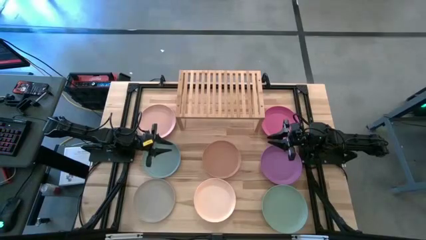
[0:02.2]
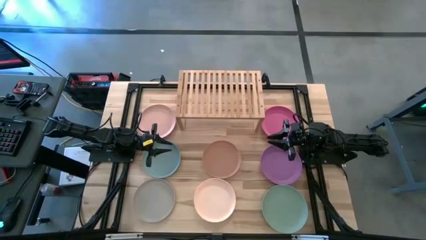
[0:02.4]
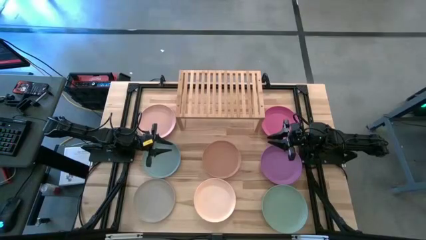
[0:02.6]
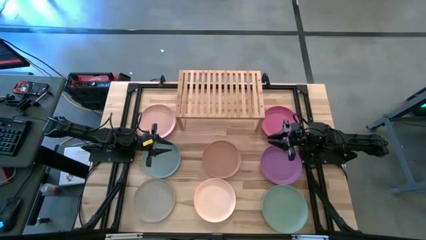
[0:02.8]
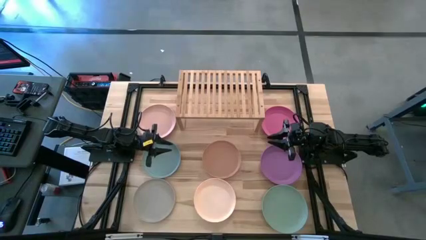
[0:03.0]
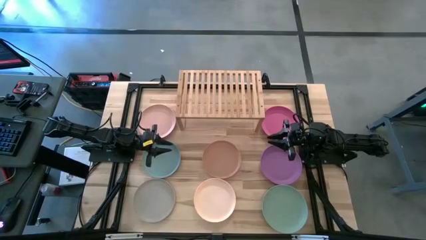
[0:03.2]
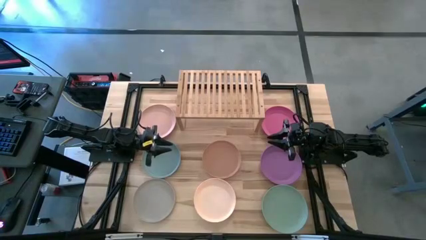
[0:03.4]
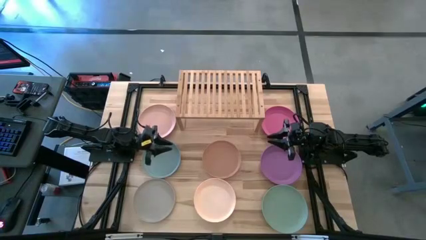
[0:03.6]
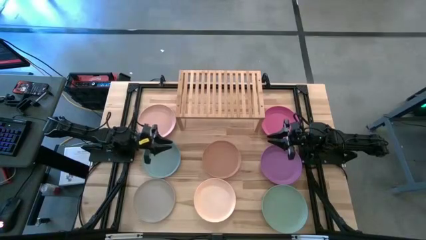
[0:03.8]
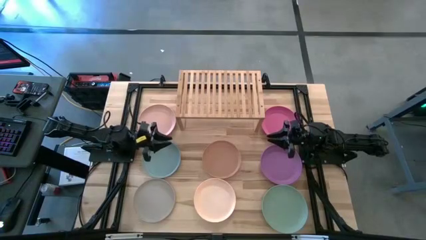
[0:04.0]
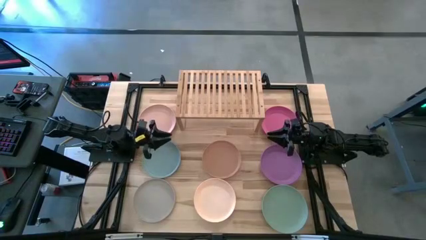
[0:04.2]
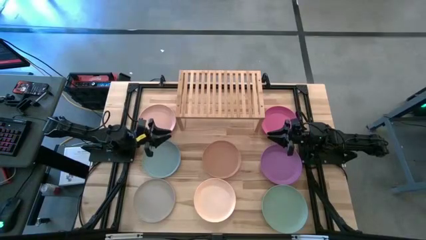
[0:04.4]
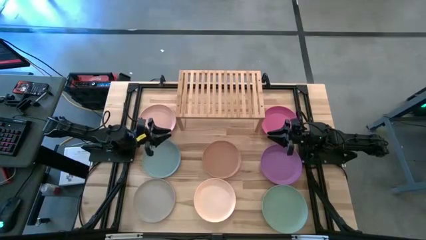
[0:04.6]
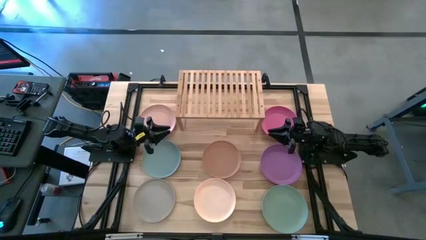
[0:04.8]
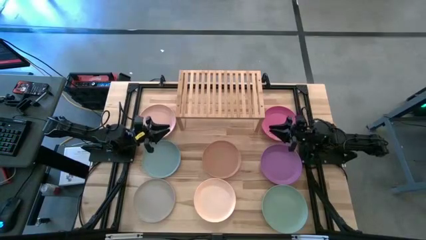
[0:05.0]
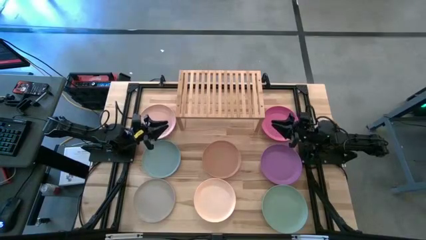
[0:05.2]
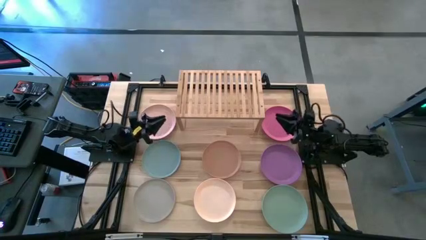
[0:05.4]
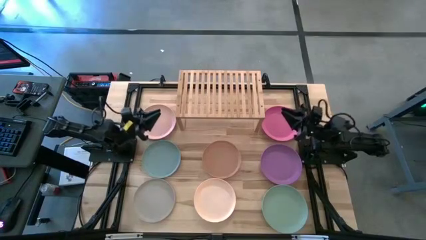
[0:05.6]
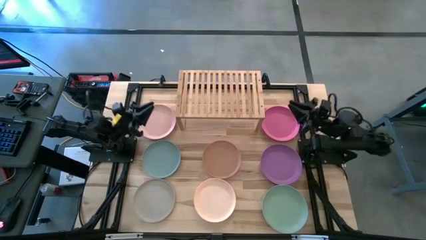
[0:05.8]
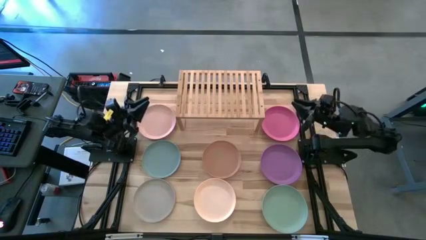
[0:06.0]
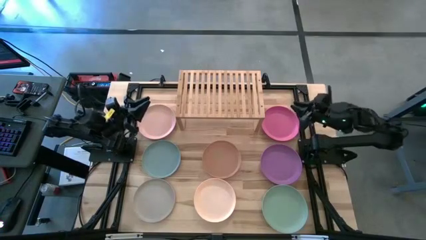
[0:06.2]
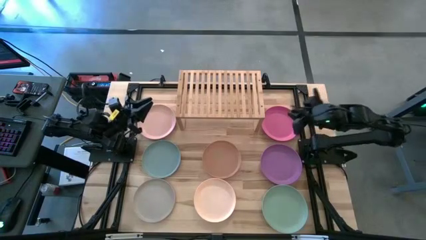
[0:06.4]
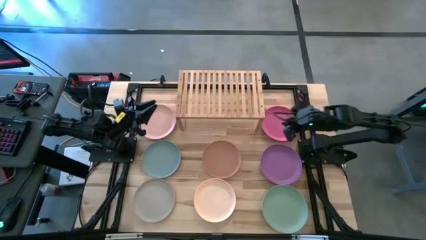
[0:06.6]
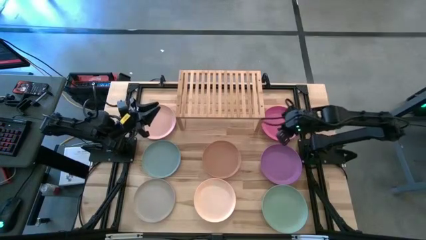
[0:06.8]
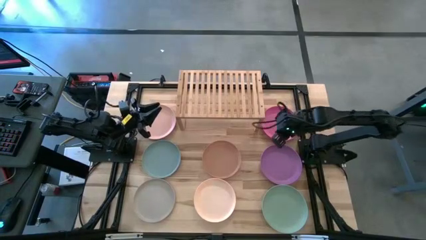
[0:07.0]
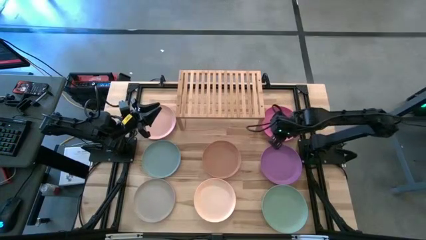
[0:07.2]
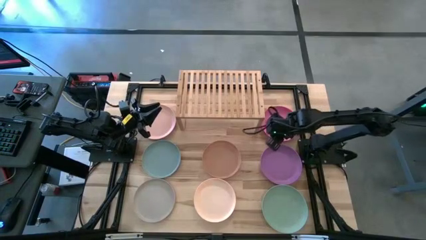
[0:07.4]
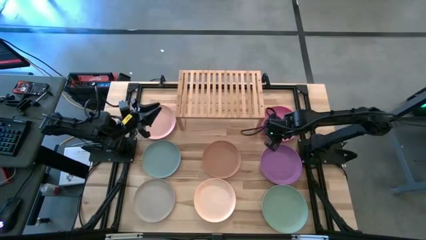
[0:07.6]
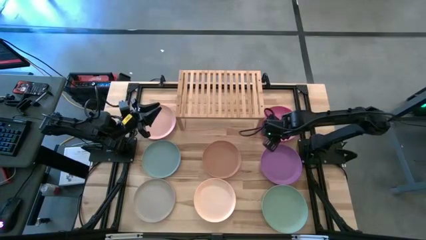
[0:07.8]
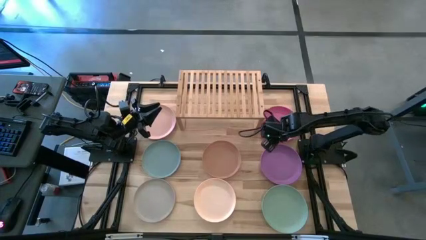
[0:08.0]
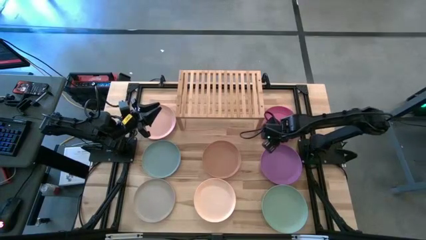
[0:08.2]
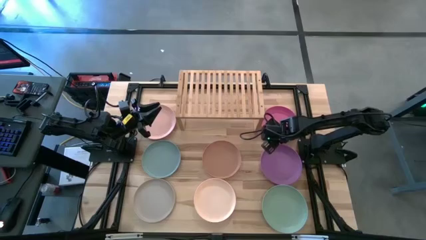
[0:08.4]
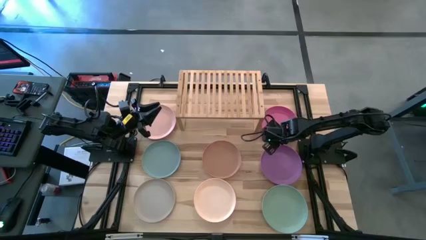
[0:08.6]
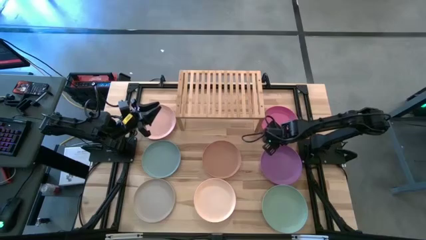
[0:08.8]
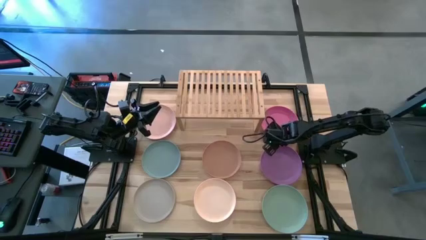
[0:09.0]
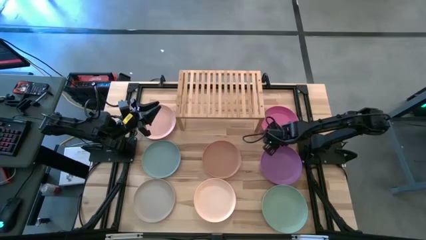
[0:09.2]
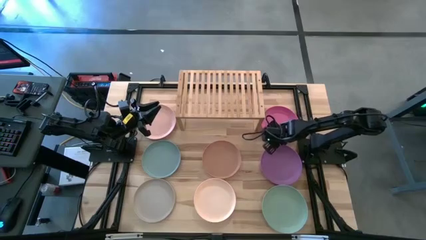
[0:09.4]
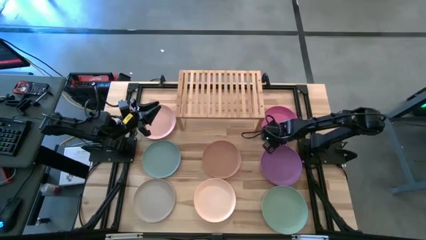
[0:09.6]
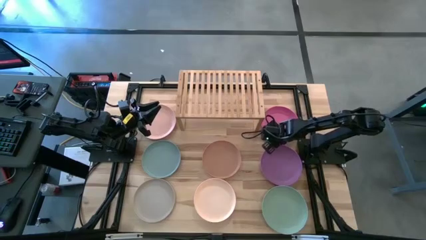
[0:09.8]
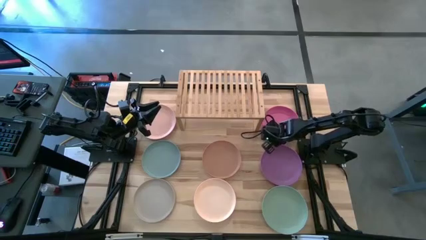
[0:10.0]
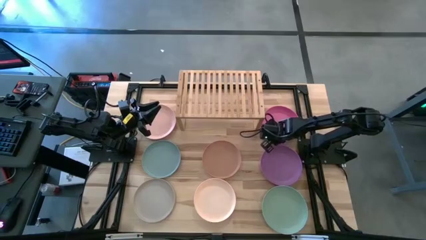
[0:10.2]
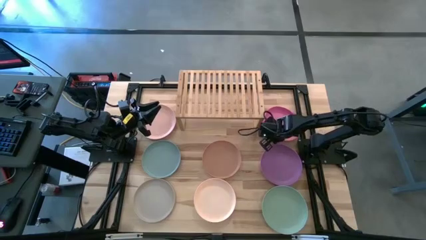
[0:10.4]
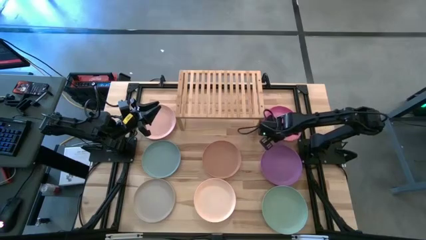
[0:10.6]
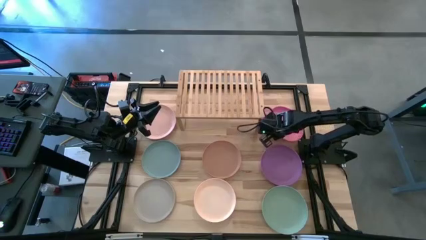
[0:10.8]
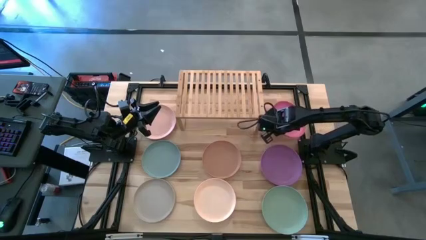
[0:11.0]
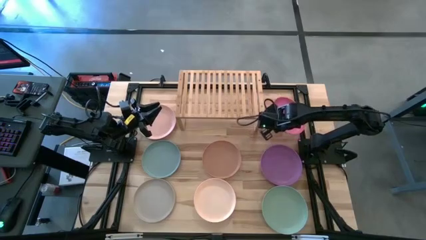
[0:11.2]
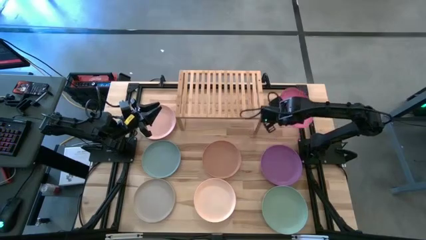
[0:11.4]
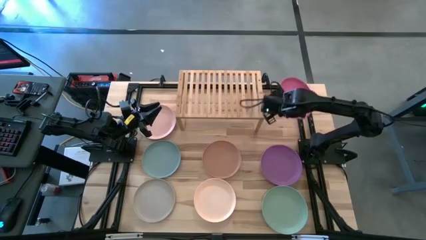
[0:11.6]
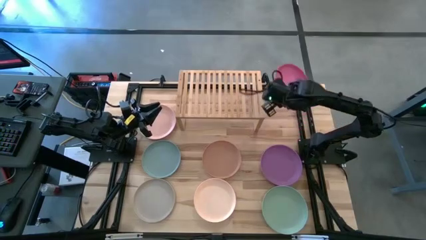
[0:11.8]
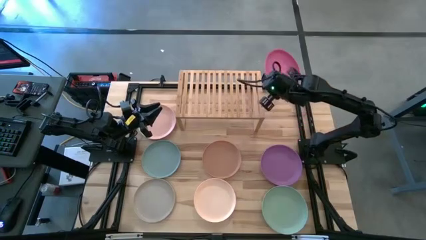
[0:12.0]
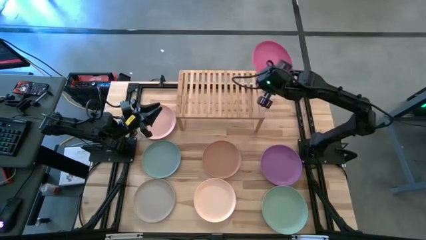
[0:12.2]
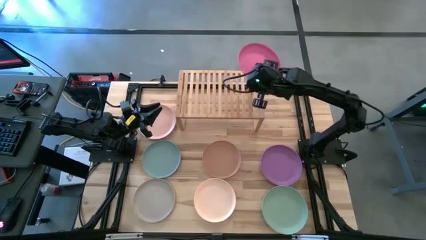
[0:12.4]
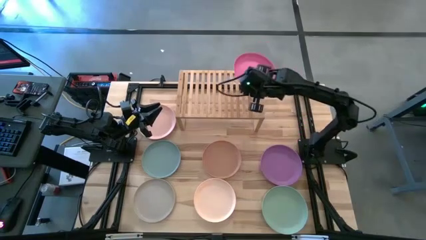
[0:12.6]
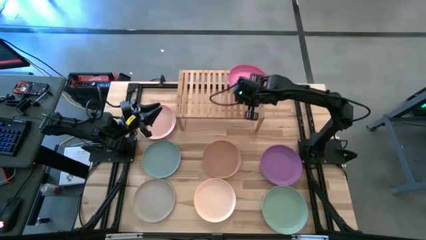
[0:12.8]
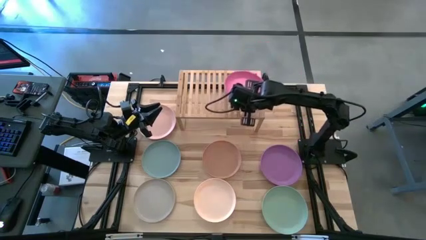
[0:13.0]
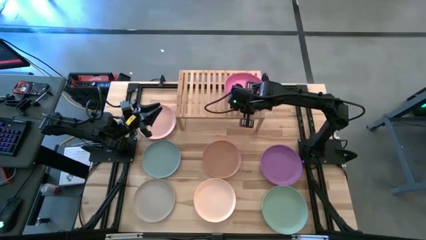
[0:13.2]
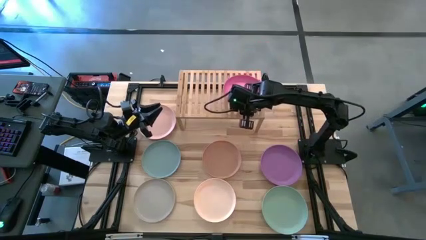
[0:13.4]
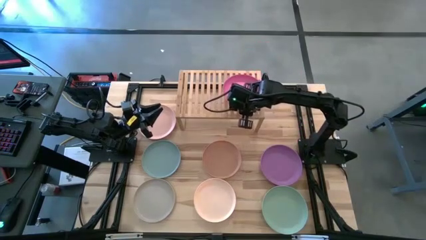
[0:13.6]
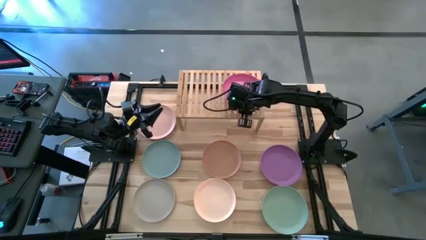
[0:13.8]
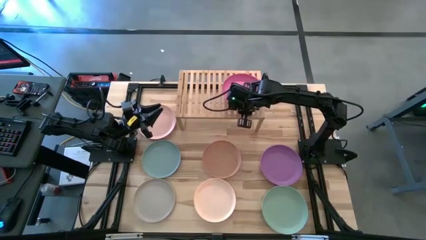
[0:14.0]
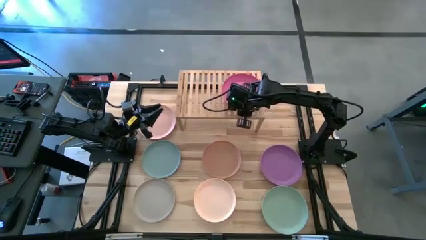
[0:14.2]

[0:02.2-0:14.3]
Task: Place and stack plates onto a shelf
Put the pink plate on the shelf
